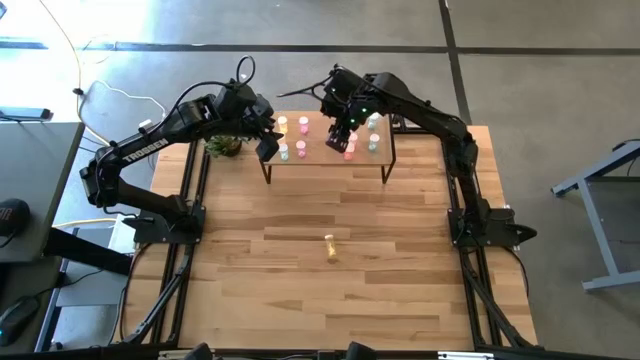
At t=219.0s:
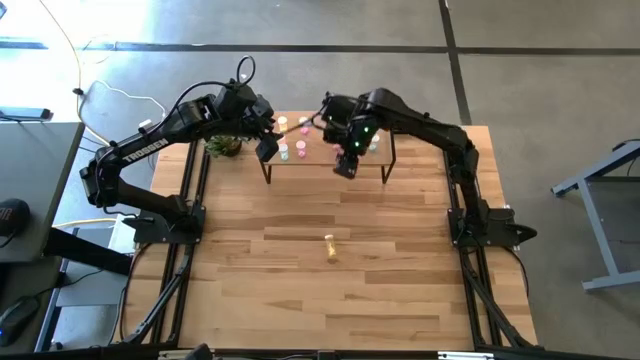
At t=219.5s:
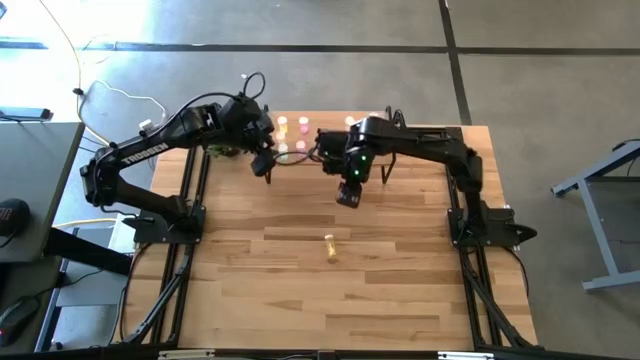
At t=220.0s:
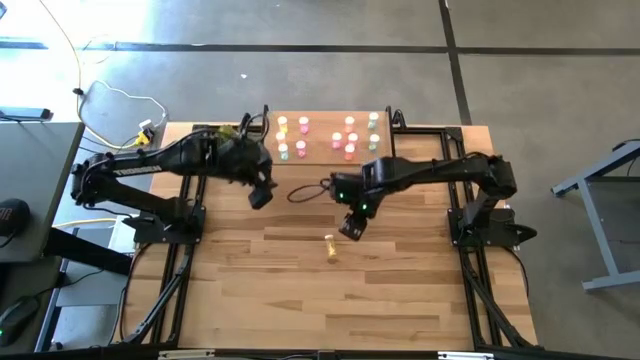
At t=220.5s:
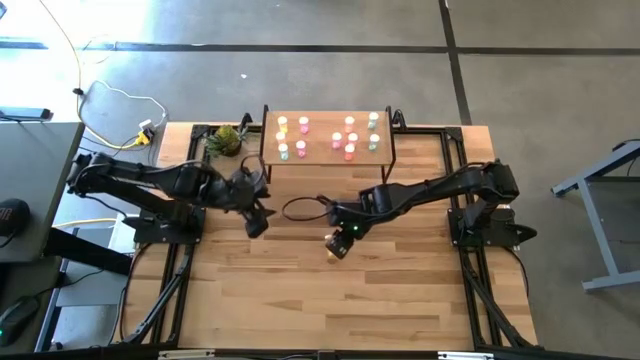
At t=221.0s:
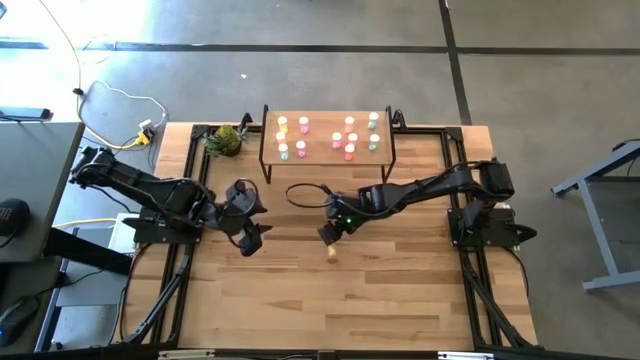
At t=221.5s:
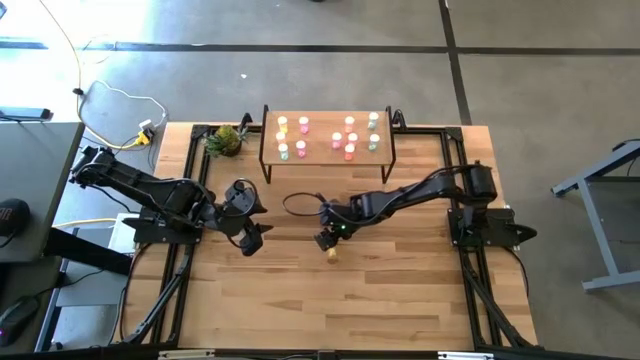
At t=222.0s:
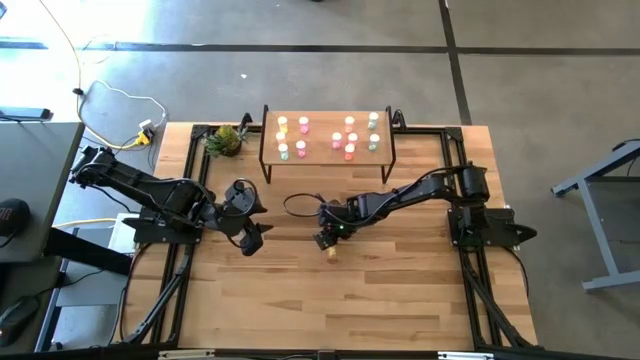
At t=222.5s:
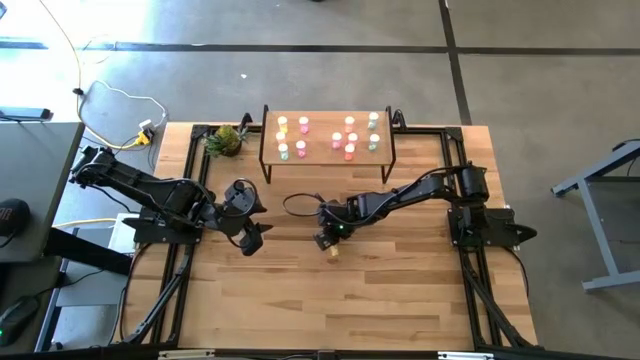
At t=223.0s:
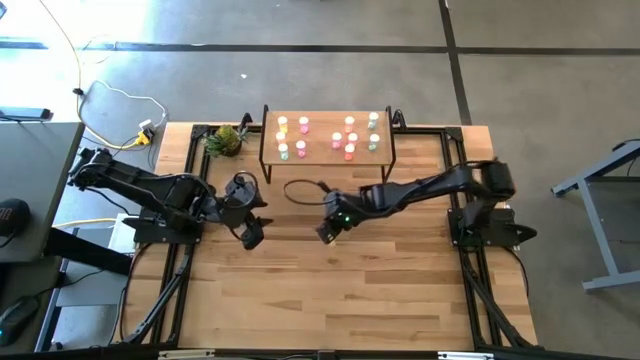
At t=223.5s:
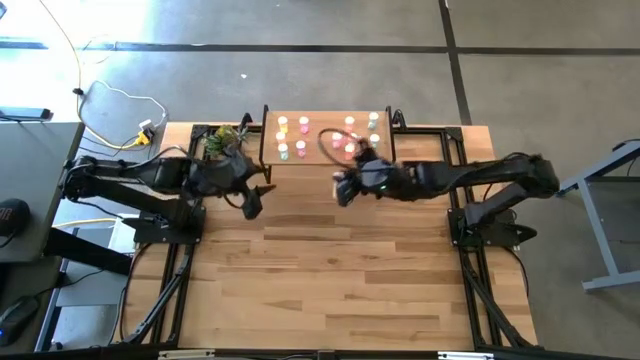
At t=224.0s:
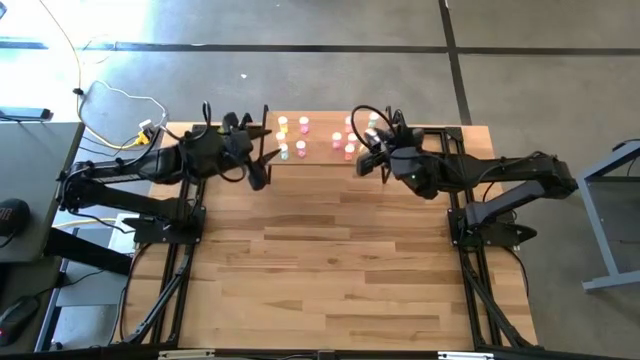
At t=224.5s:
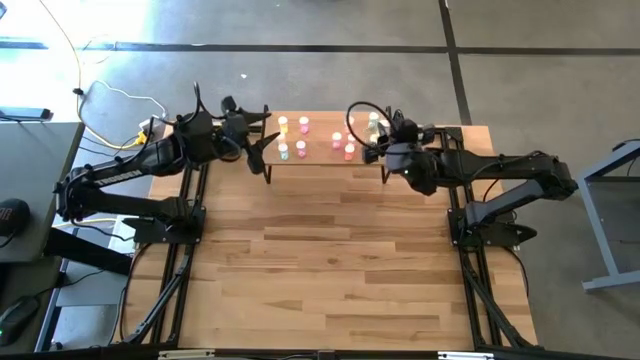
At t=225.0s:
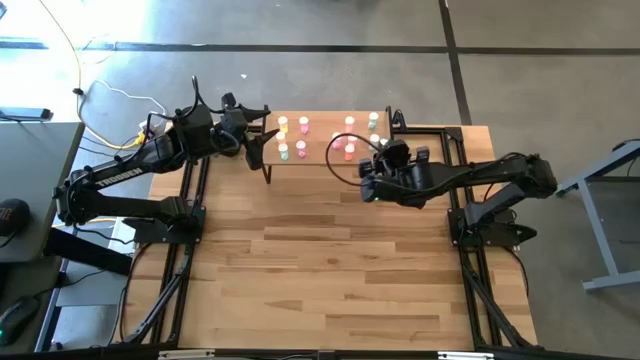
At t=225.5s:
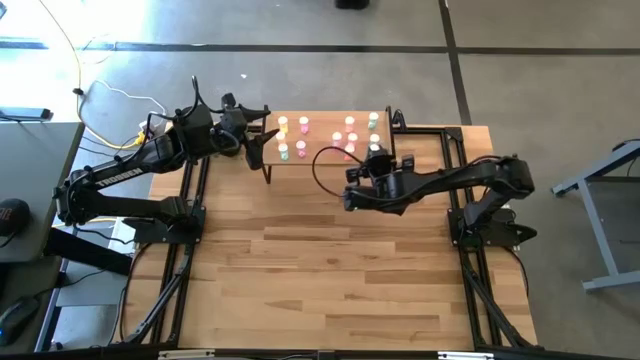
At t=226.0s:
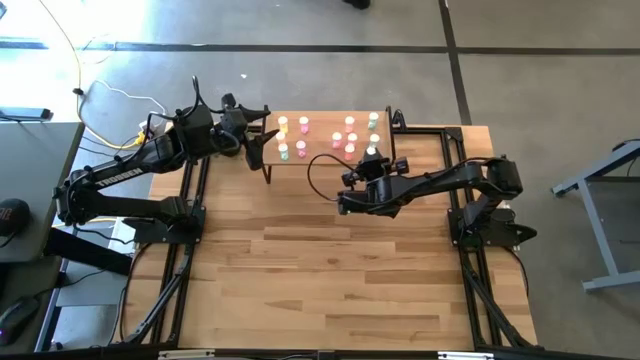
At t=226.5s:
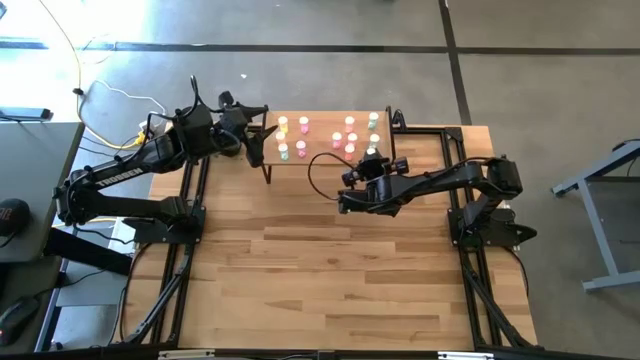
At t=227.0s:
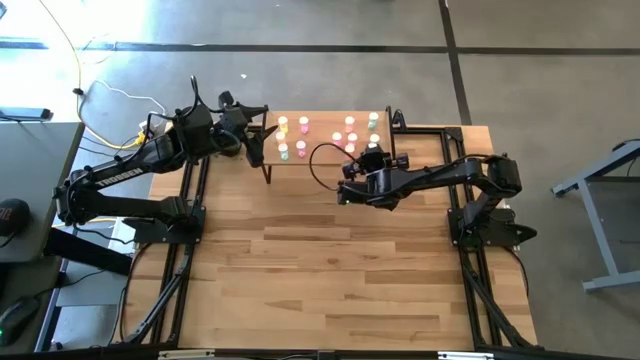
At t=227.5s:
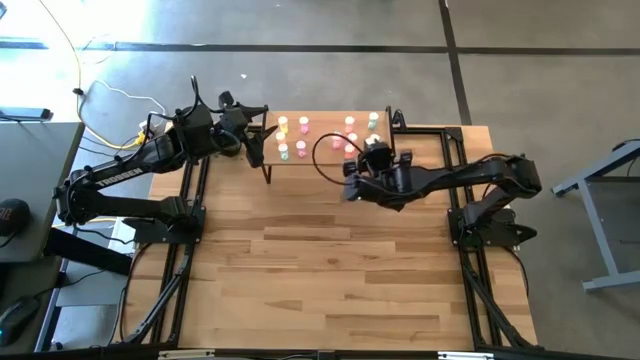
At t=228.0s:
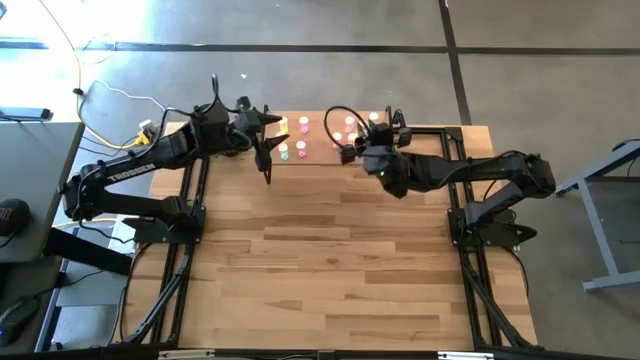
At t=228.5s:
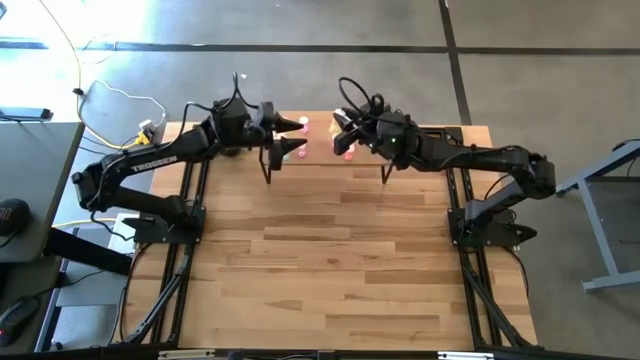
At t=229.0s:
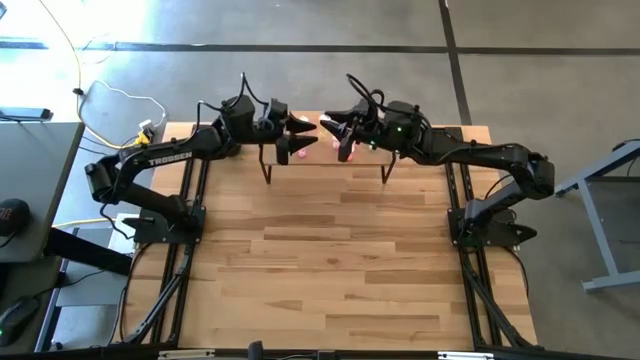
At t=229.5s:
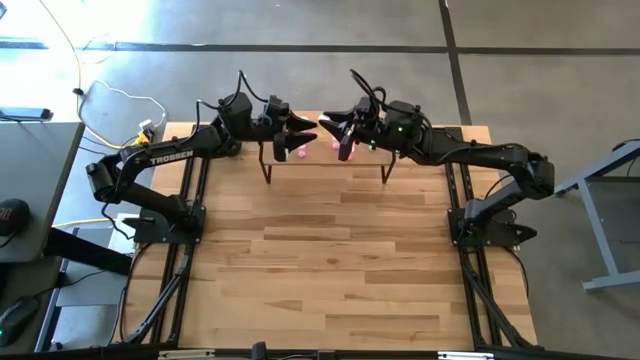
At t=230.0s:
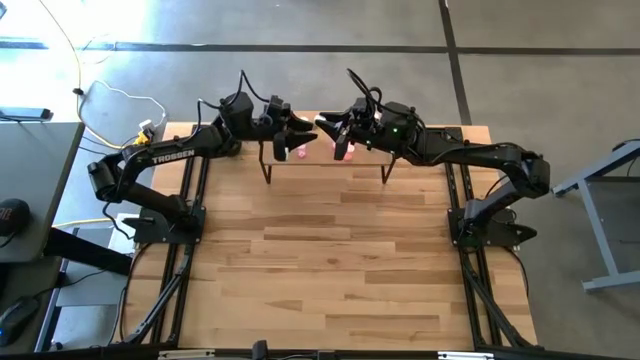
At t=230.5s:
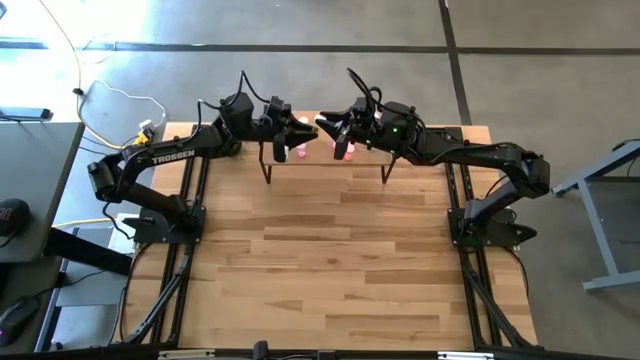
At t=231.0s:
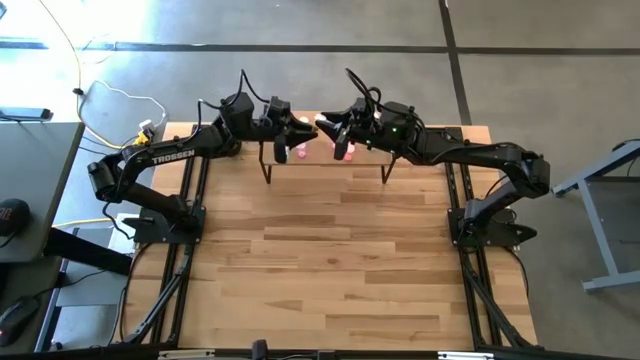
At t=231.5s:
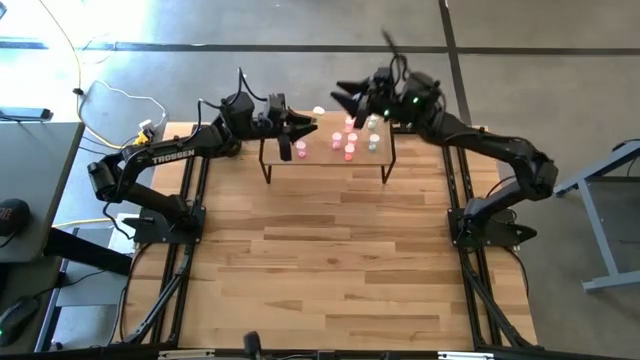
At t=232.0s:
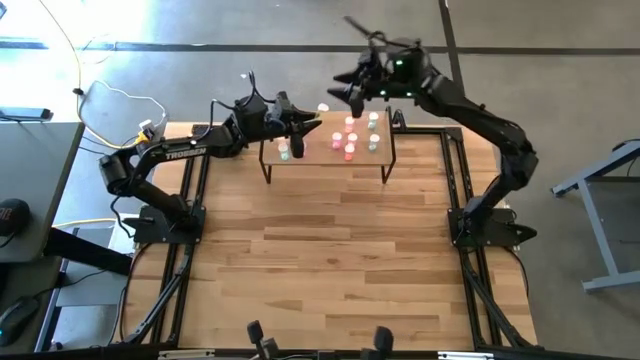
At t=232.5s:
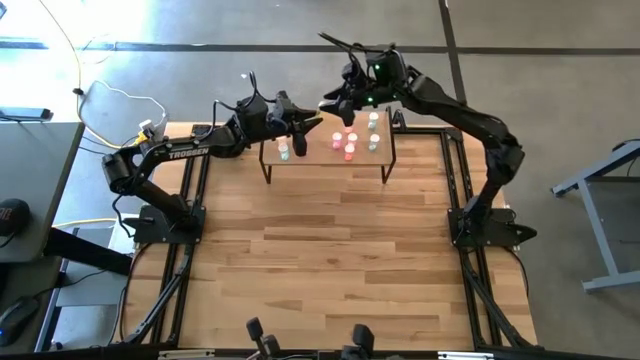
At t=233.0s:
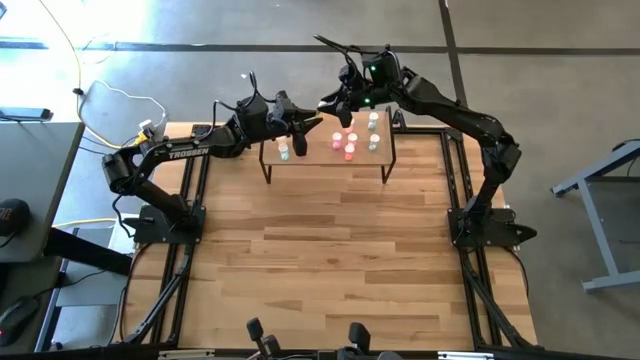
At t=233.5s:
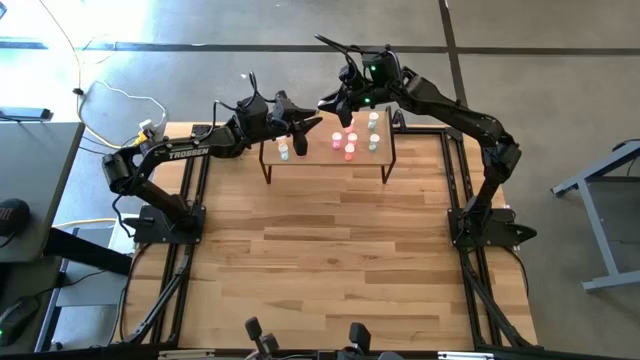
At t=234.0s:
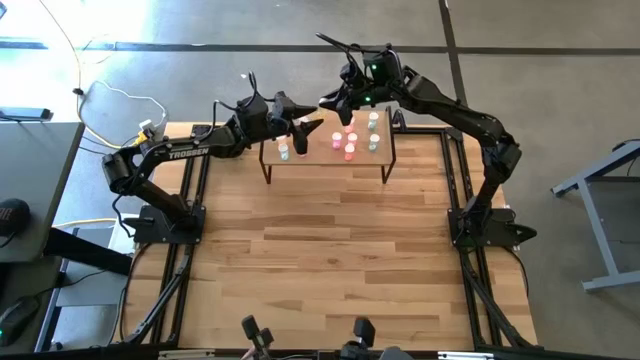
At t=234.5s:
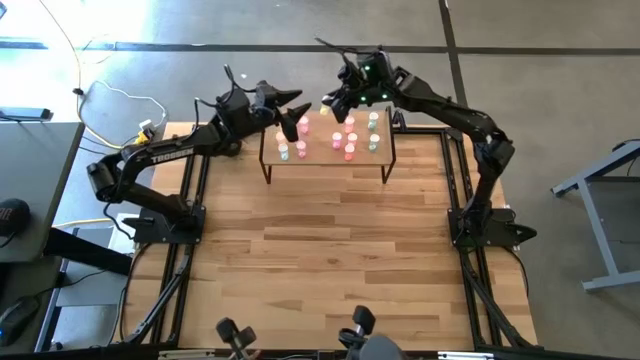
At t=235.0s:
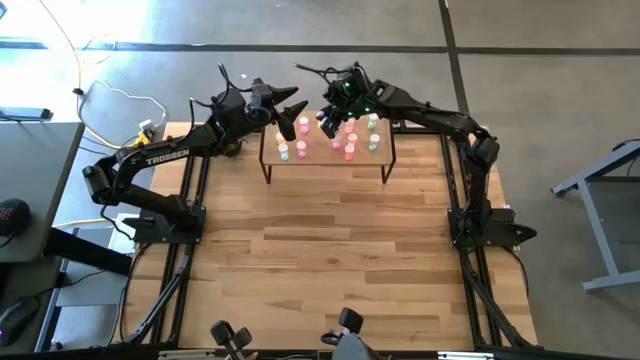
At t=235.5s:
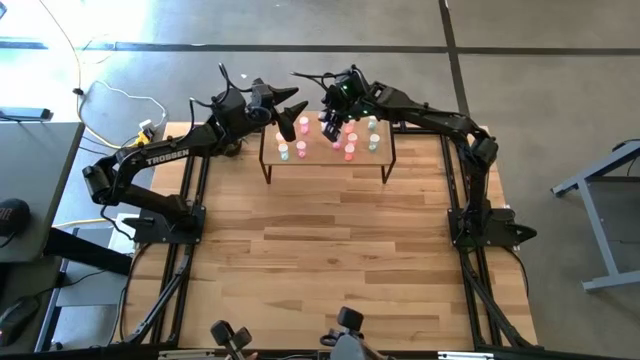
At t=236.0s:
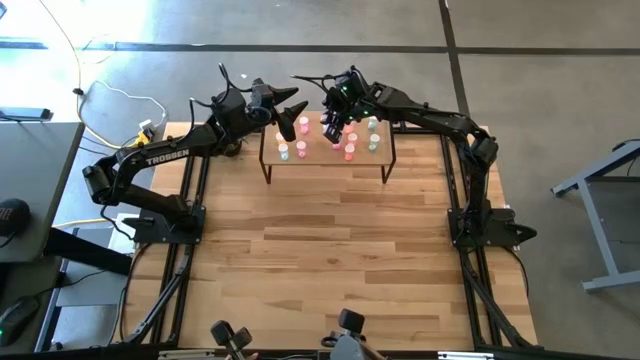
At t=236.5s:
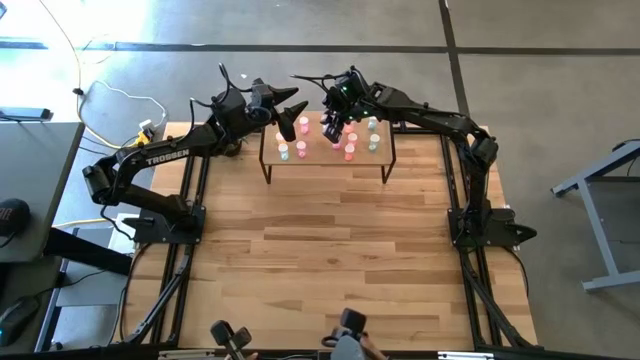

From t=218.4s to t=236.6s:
Task: Pick and place medicine bottles onto shelf by color
Put the yellow pill bottle on the shelf

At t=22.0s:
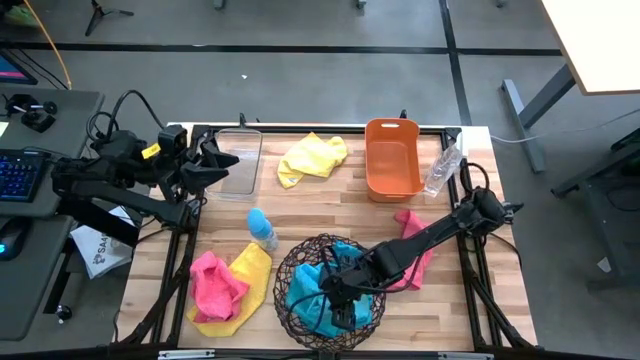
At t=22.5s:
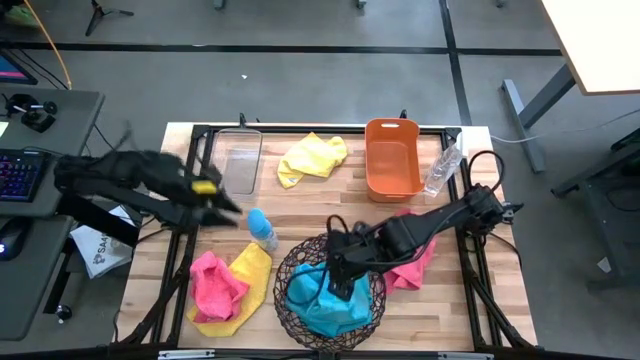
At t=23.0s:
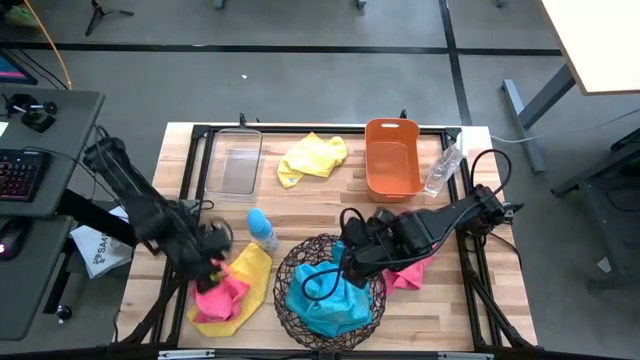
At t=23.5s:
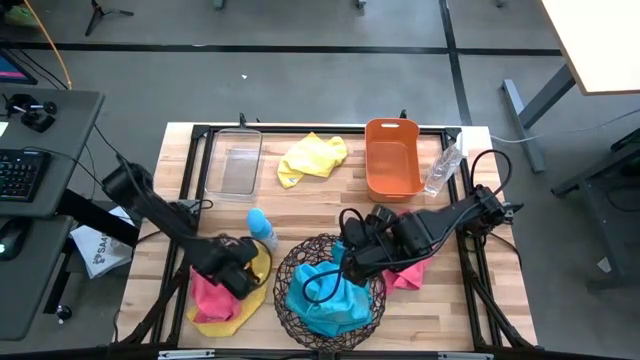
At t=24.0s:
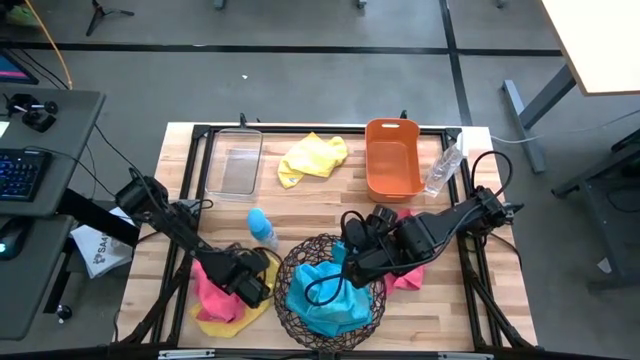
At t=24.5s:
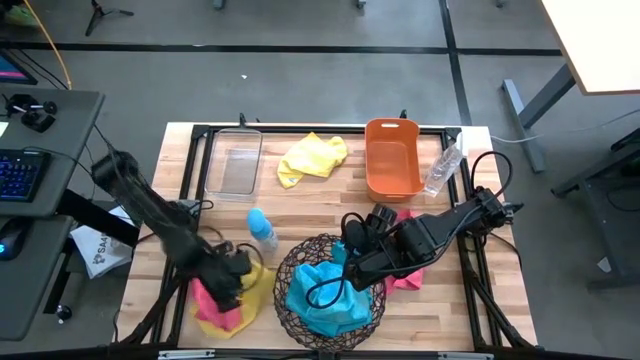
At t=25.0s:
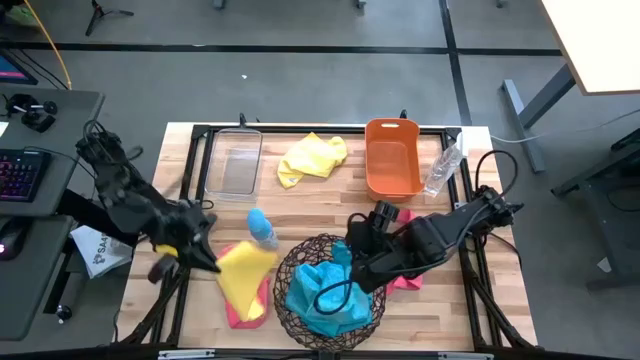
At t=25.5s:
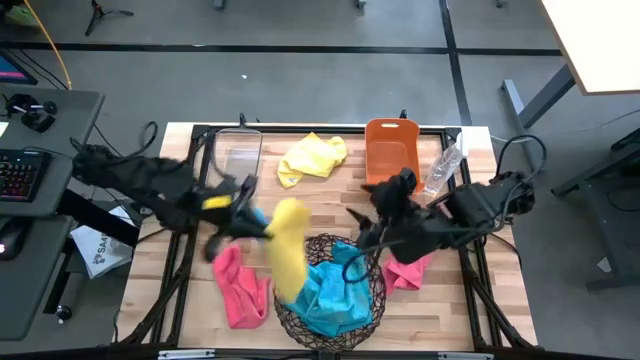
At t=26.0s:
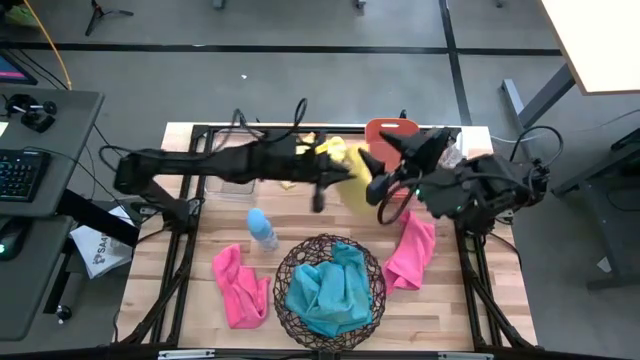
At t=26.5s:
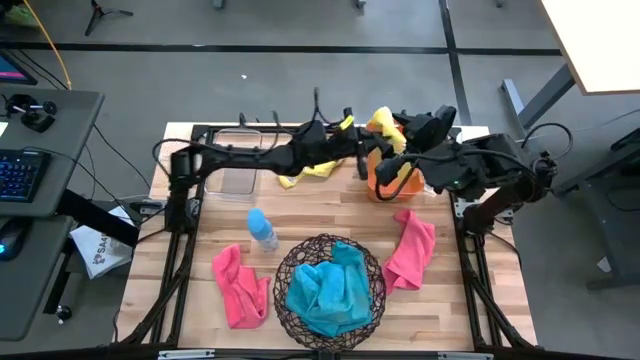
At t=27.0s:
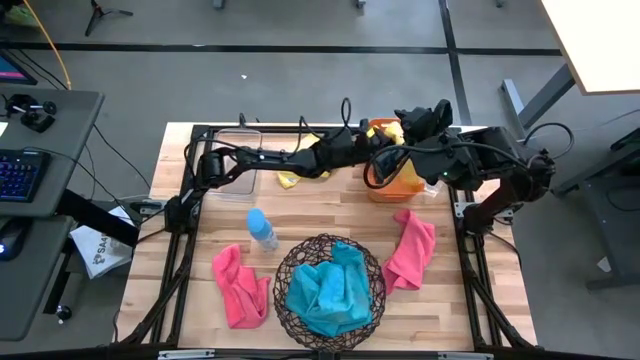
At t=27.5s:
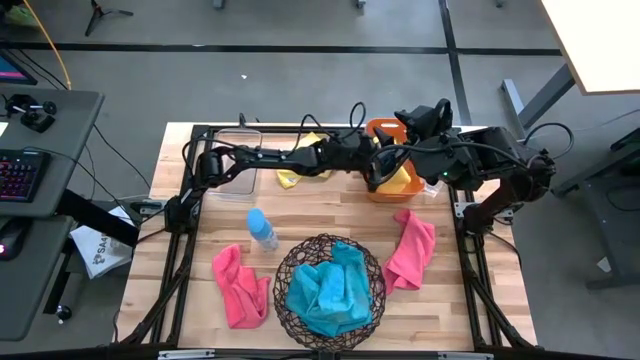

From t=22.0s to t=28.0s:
Task: Sort microfiber towel by color & place in baskets
Put the bottom yellow towel into the orange bin
